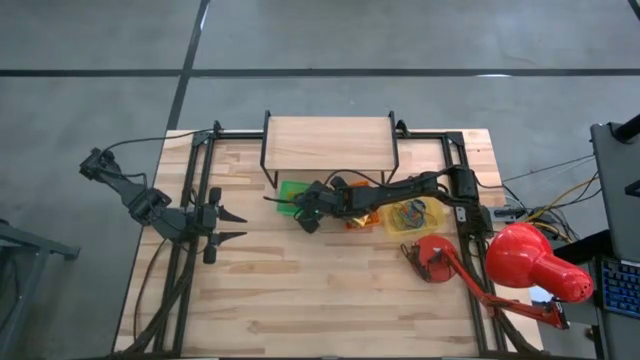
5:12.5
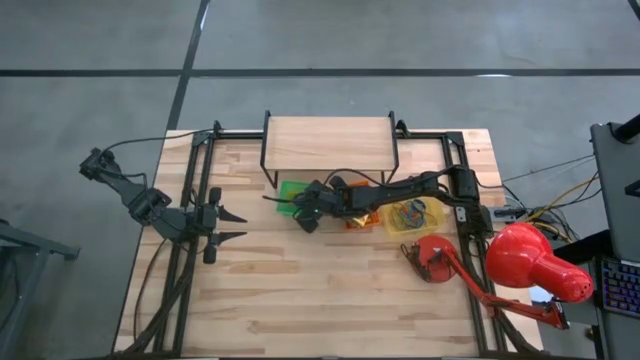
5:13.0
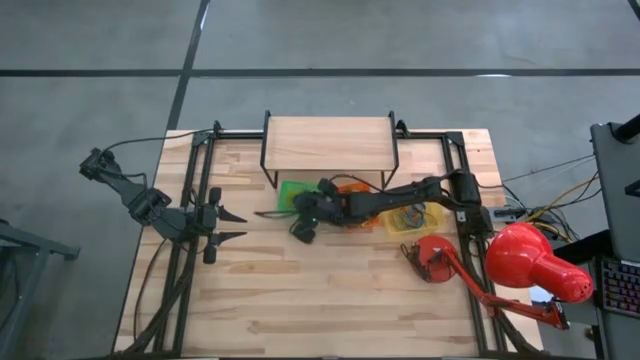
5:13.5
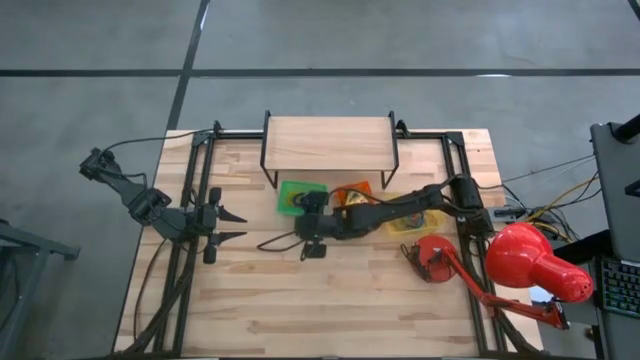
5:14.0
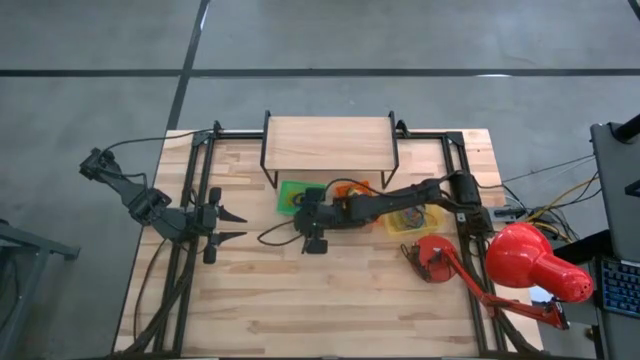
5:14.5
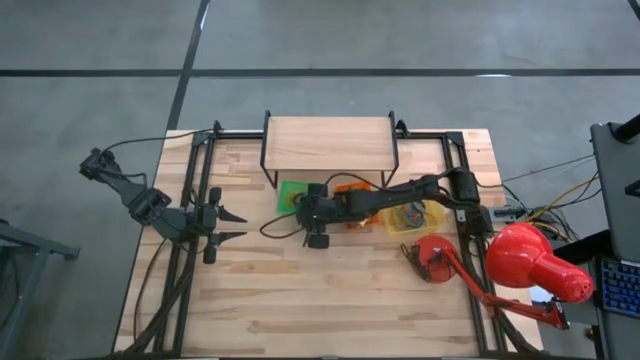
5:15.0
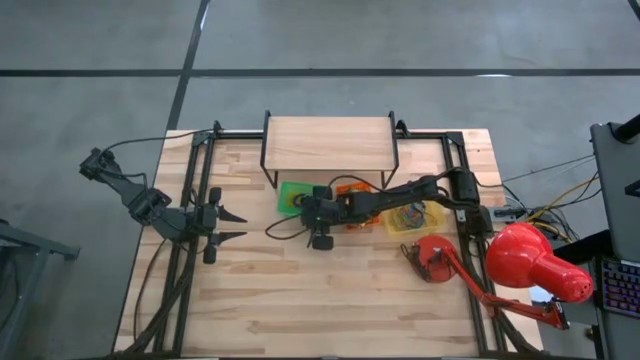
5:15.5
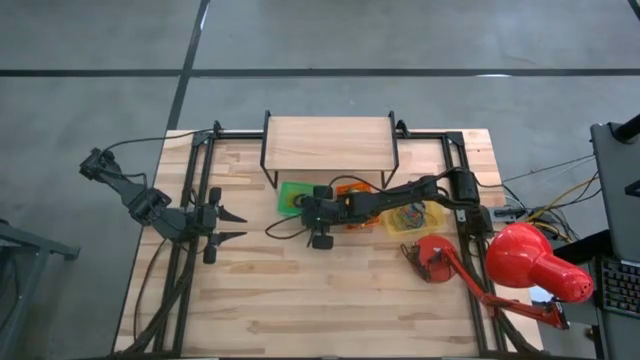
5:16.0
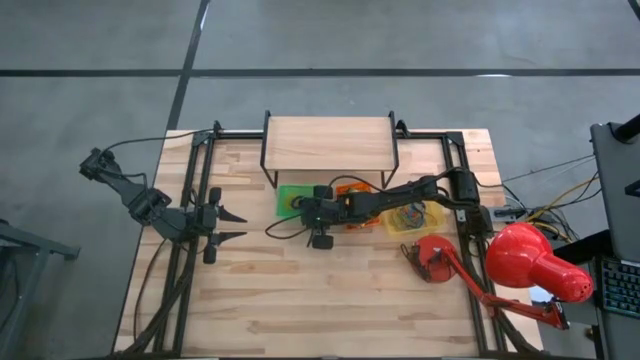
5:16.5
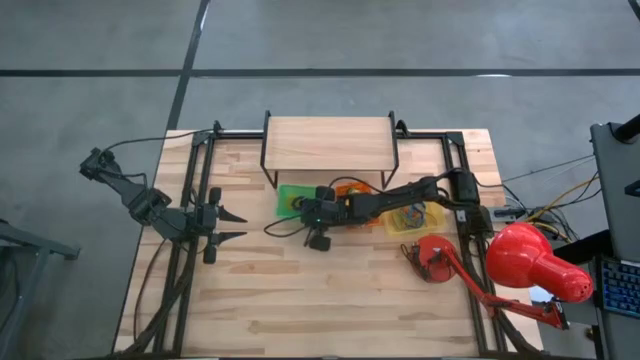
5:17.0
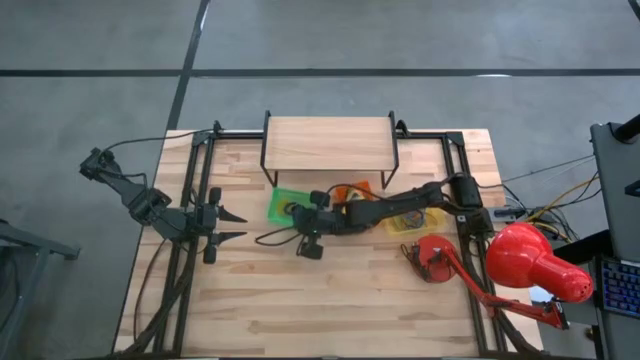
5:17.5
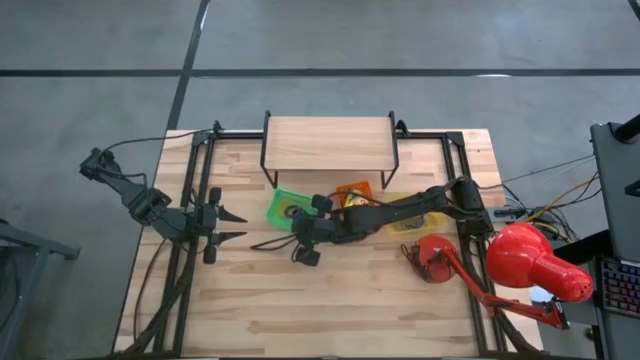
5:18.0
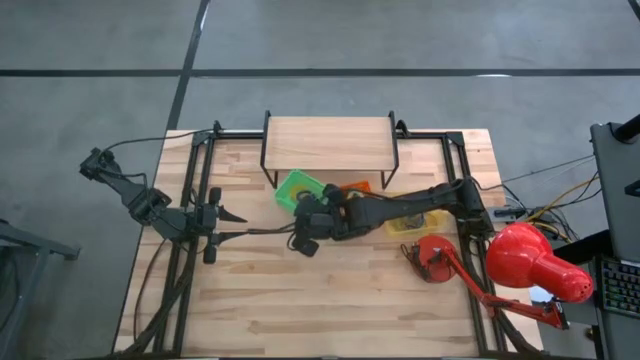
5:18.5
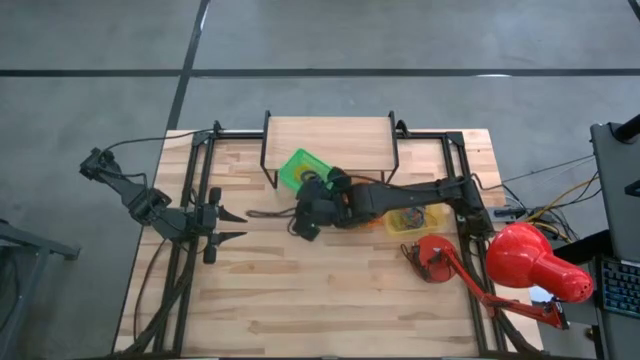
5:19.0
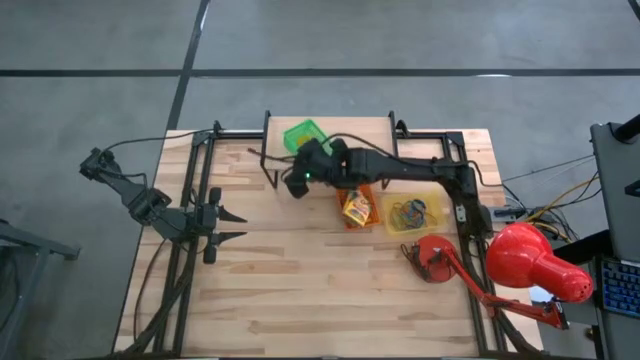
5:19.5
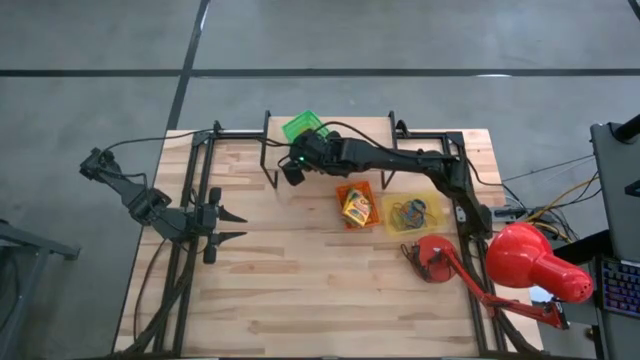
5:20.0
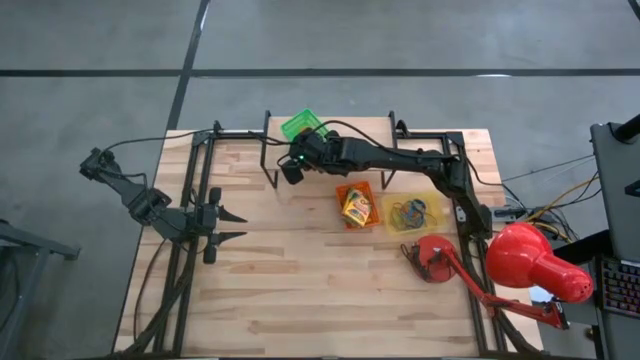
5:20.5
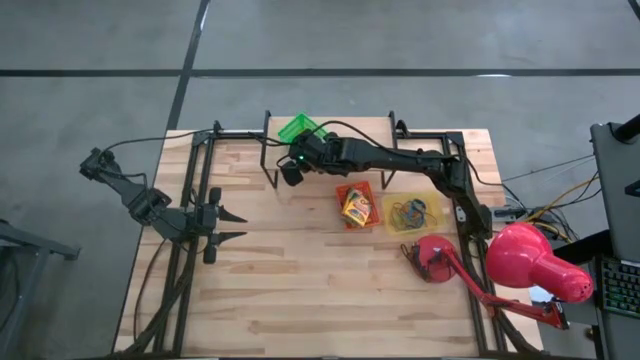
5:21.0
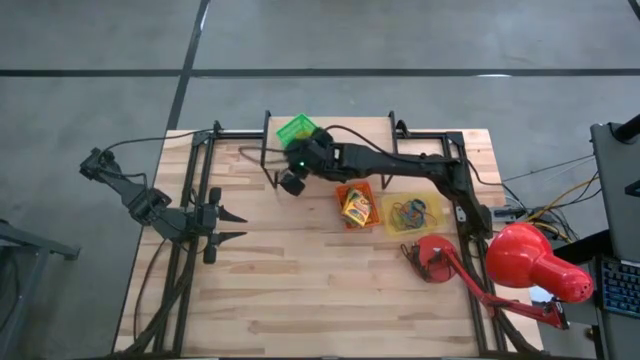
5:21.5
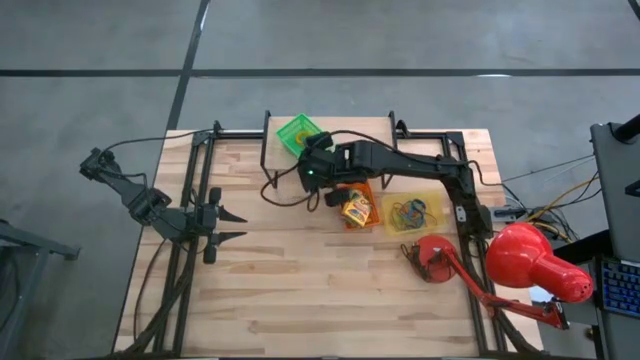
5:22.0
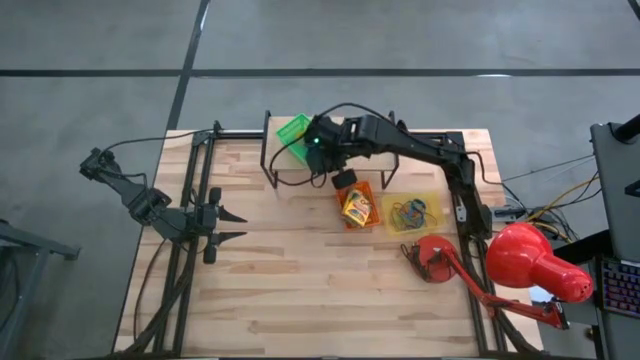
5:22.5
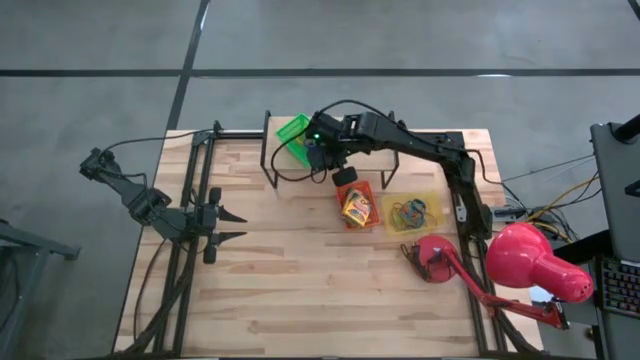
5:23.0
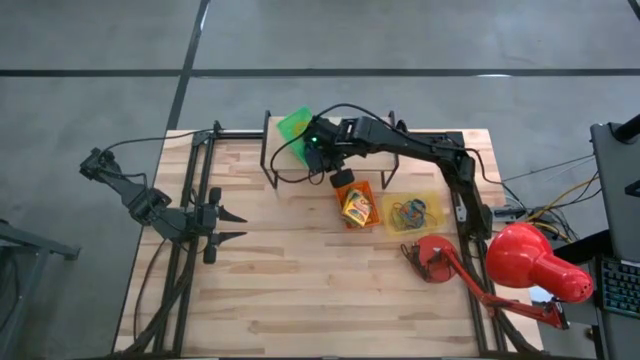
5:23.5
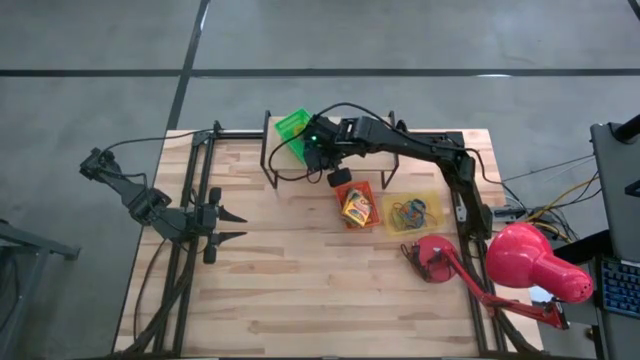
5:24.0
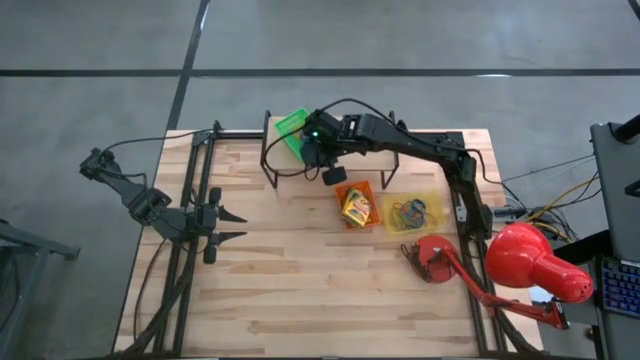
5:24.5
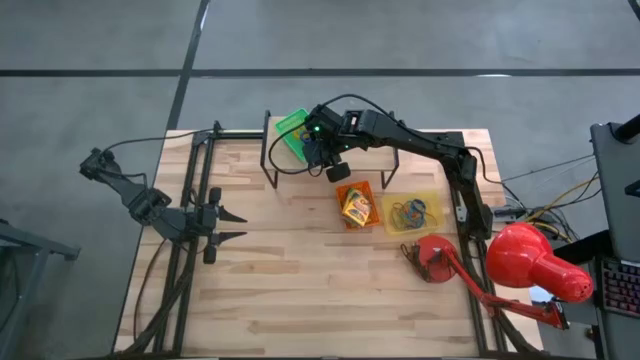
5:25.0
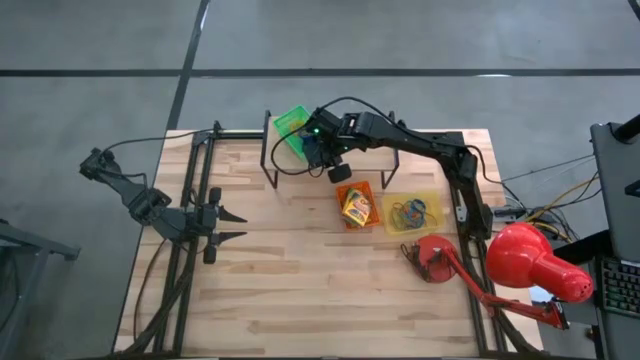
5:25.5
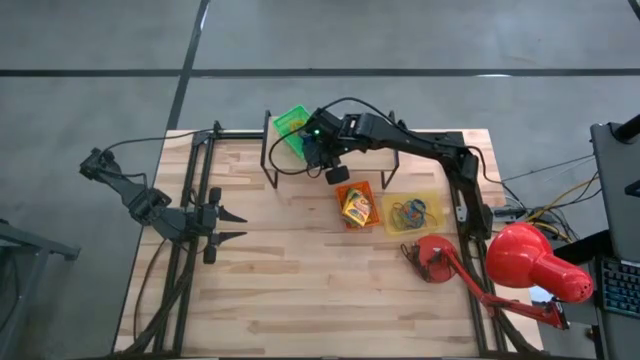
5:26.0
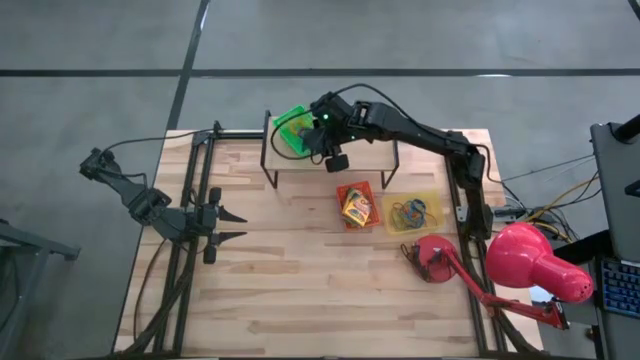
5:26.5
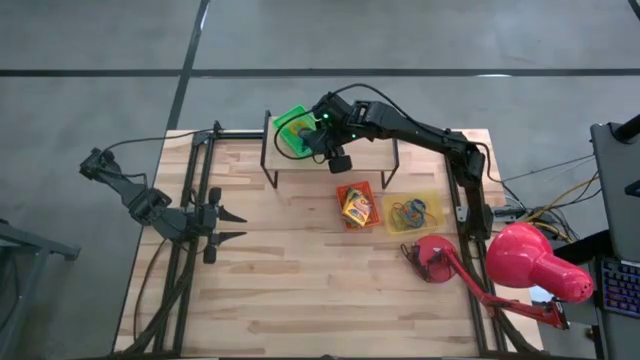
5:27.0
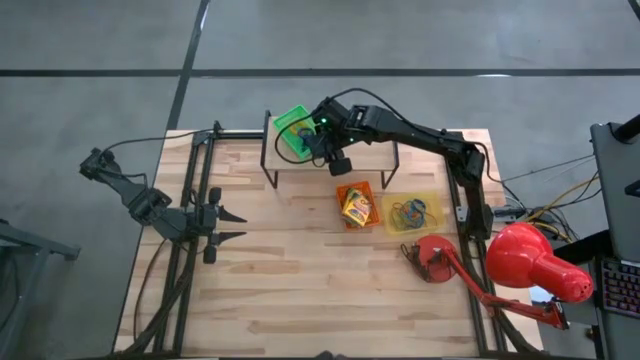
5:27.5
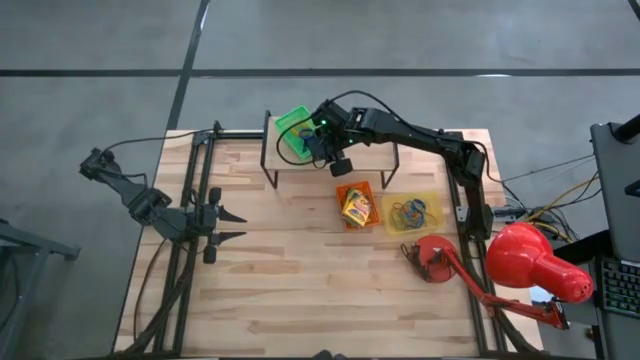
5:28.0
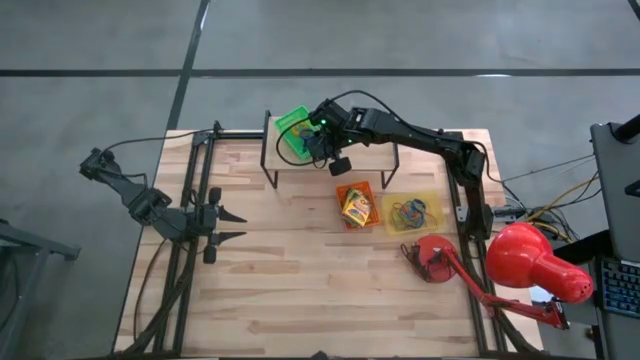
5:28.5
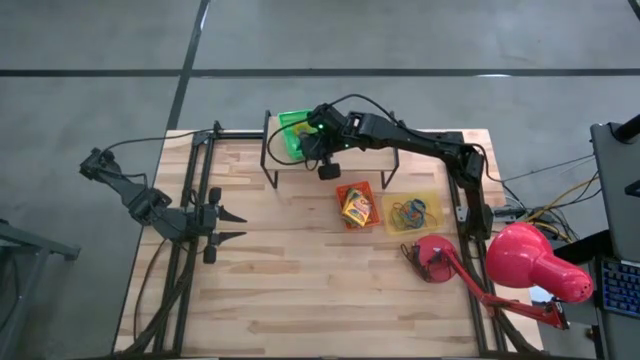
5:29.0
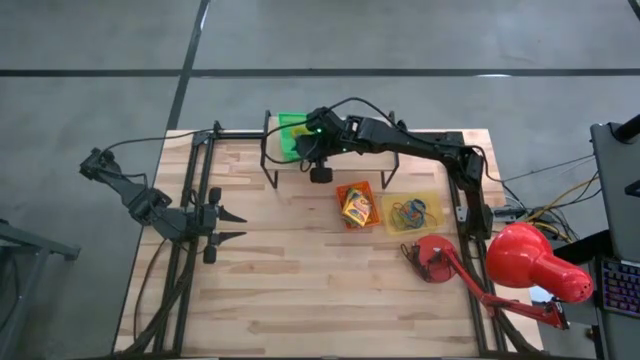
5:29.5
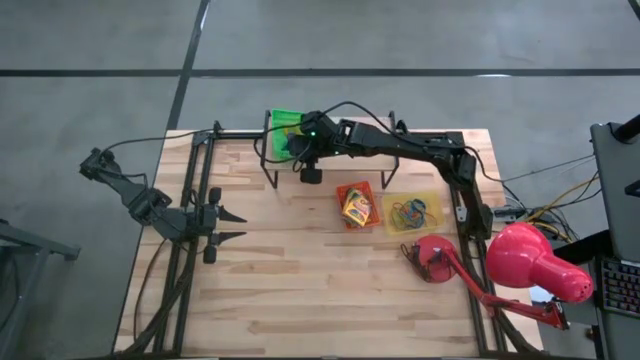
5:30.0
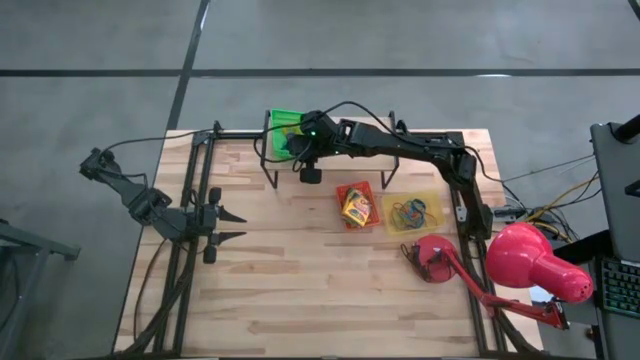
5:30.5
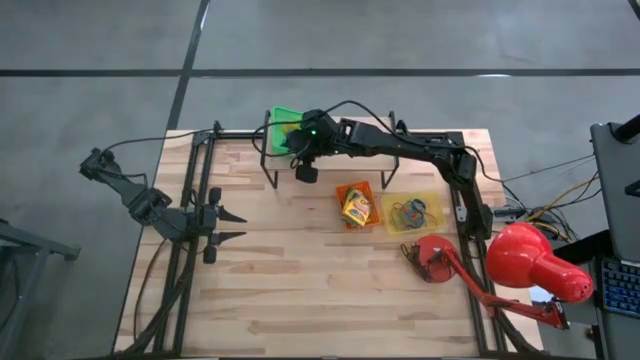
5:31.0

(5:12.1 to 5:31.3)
Task: Pick & Place Office Desk Supplies
Put the green bin on the shelf

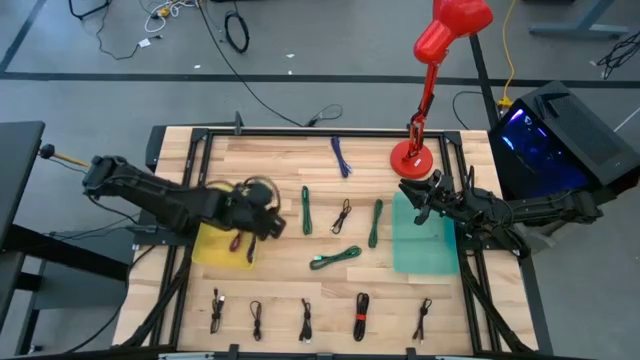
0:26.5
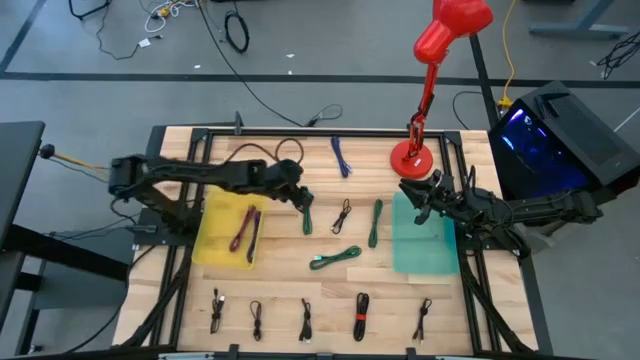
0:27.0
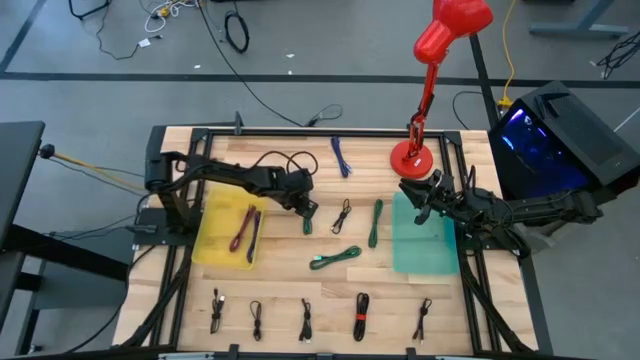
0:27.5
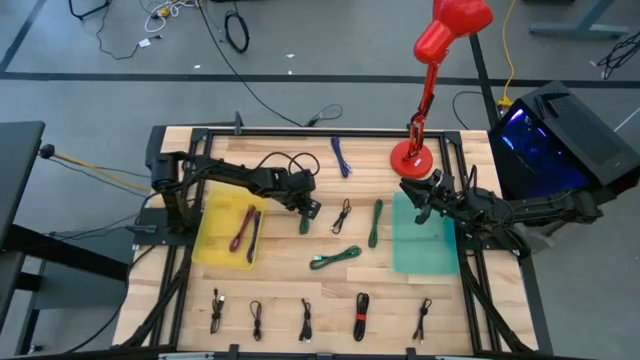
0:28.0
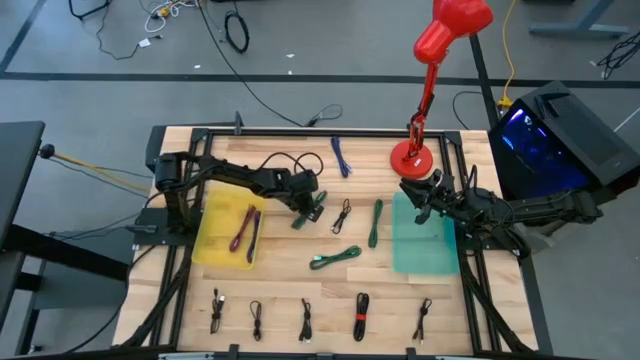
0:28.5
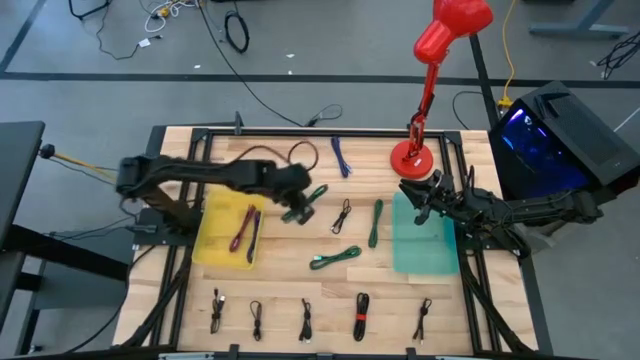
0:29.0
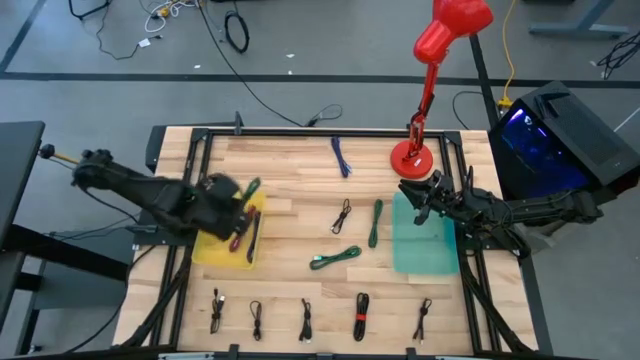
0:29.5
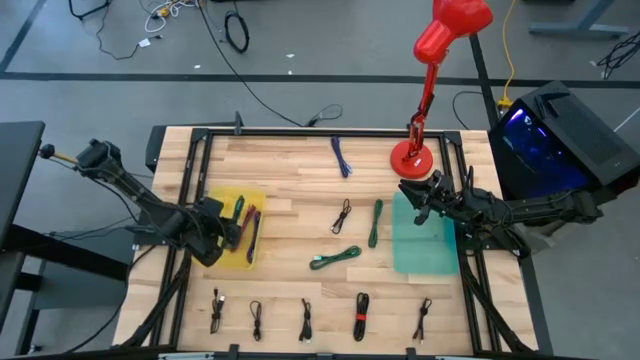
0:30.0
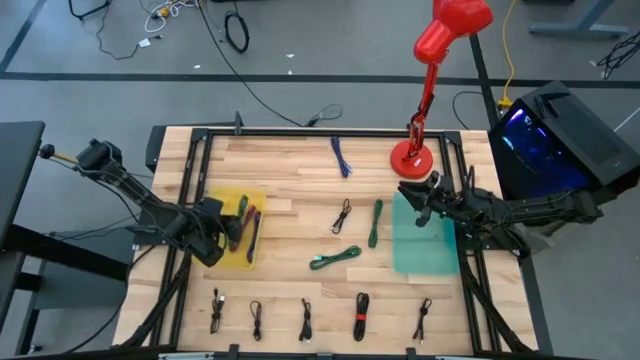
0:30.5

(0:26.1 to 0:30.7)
Task: Pick & Place USB Port
Put the black and green charger cable into the yellow bin
